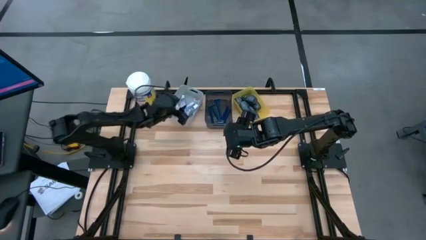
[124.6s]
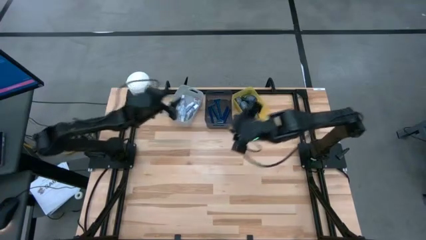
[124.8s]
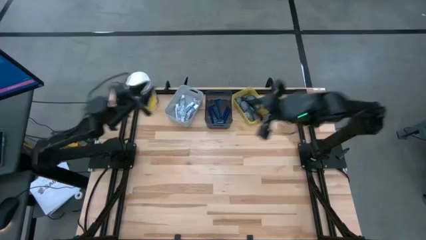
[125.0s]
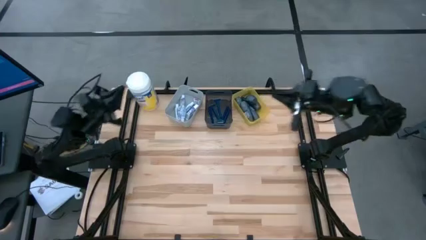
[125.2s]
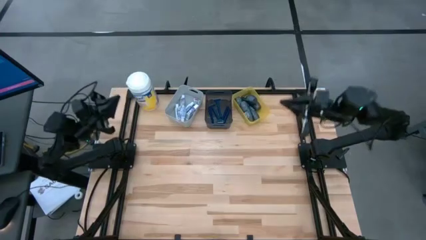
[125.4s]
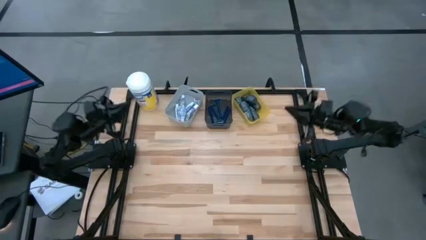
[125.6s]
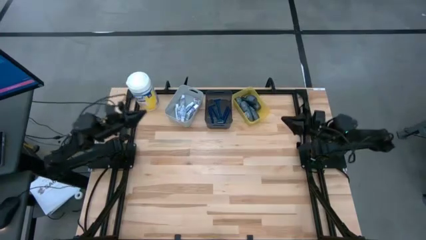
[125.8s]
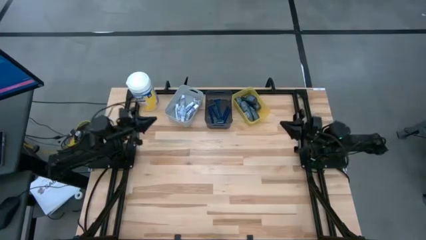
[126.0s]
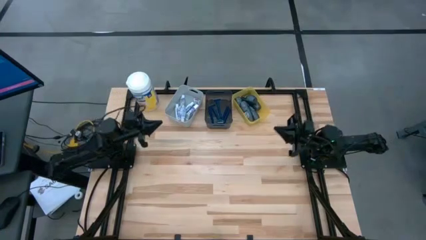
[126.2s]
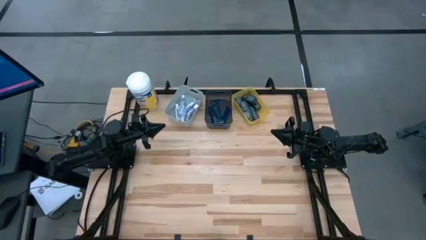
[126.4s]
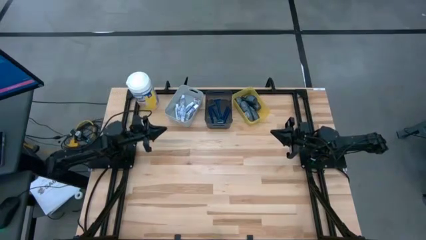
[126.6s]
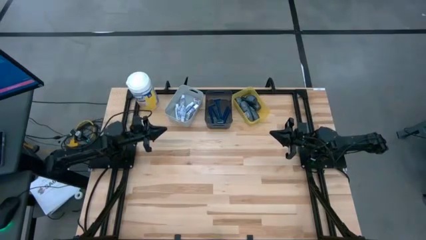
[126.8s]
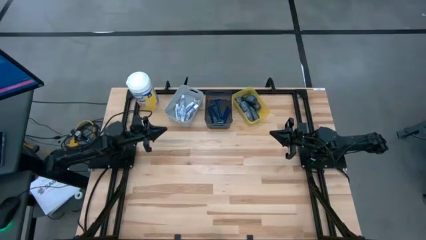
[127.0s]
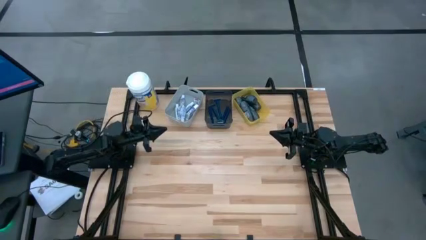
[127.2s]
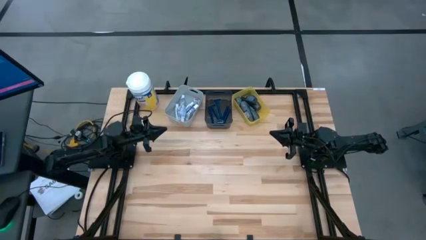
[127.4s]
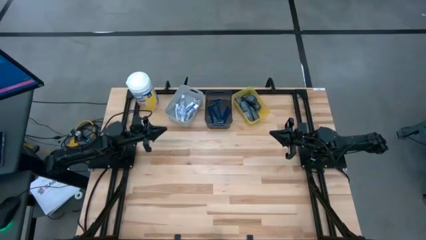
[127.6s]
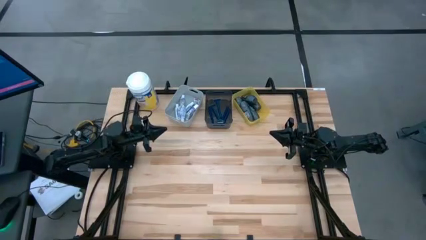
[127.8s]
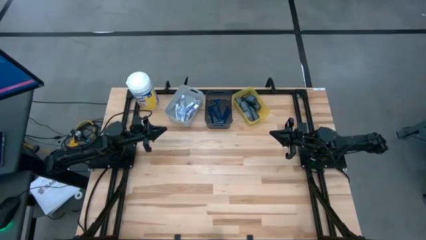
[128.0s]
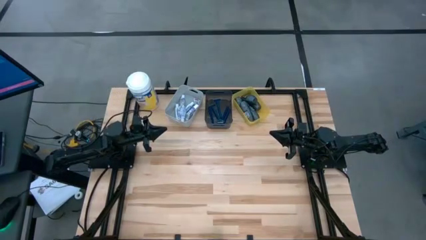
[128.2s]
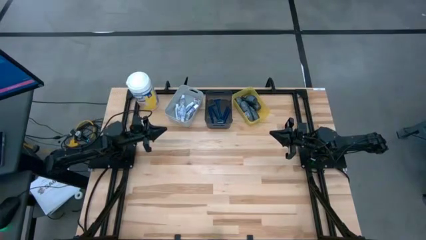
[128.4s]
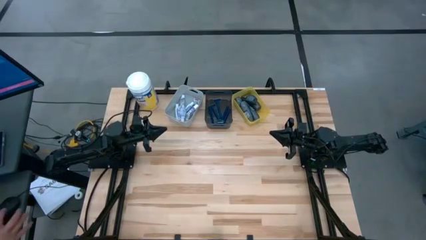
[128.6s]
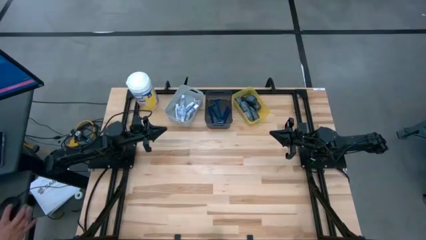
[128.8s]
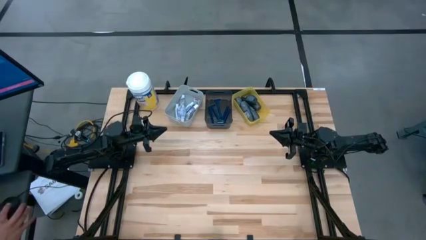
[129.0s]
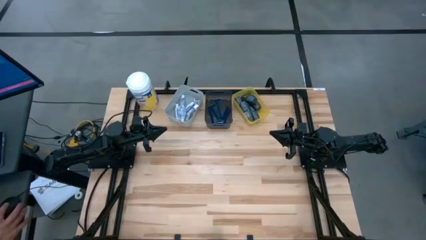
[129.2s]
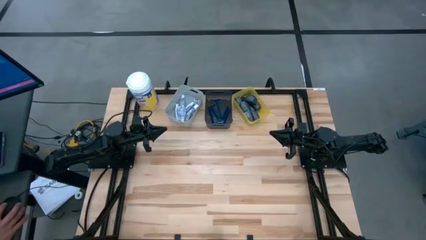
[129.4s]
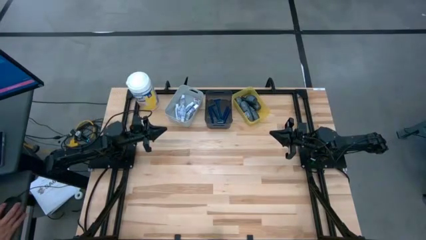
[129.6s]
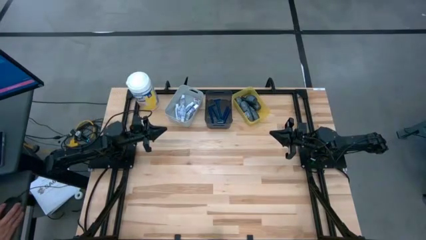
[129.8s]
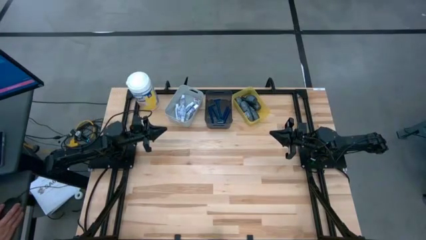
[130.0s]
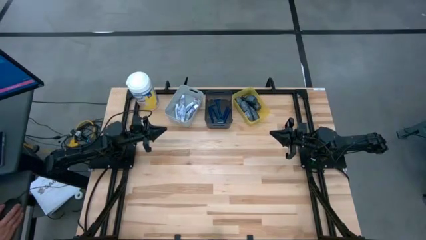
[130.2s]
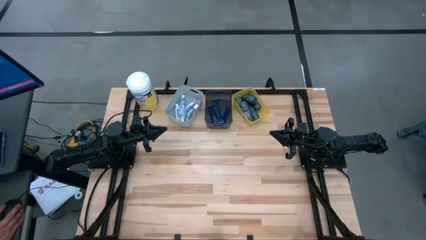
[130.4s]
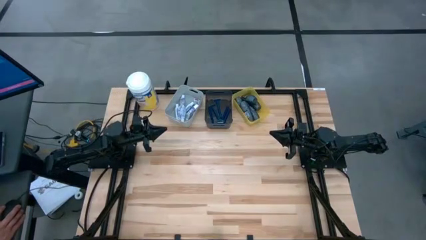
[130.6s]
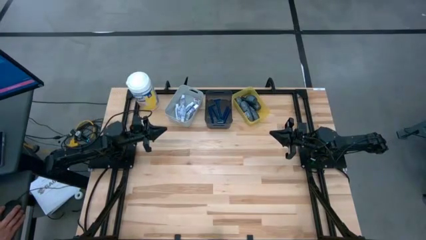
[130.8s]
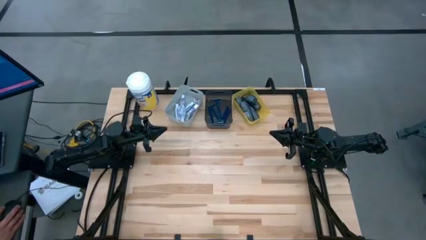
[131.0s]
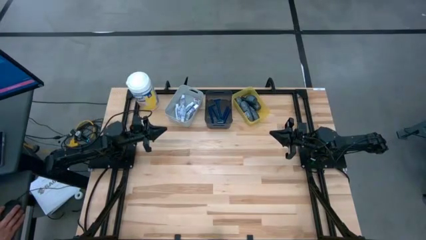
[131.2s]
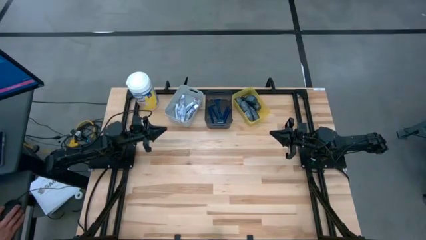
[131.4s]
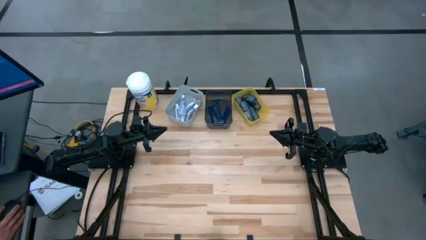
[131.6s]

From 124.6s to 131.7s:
Task: Pick & Place Travel size toiletries
Return to Home Position

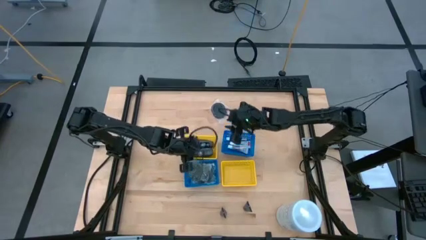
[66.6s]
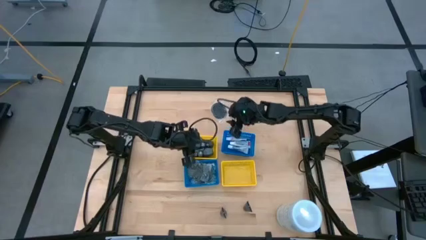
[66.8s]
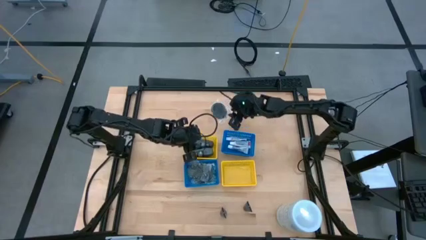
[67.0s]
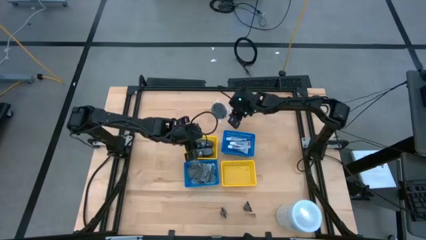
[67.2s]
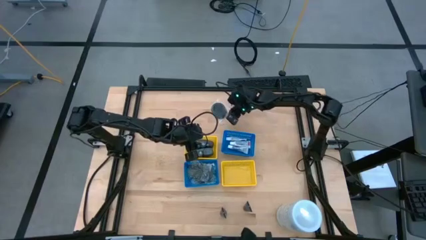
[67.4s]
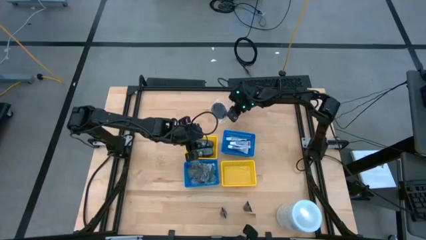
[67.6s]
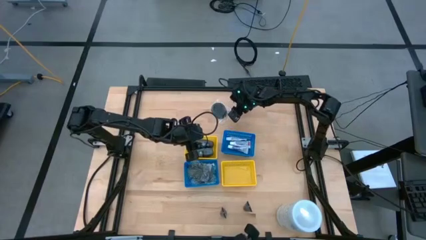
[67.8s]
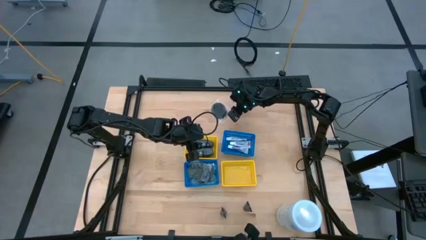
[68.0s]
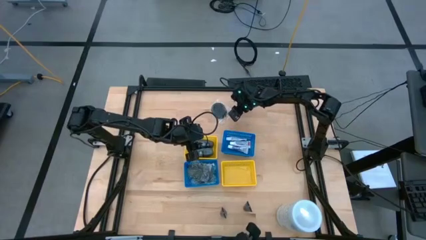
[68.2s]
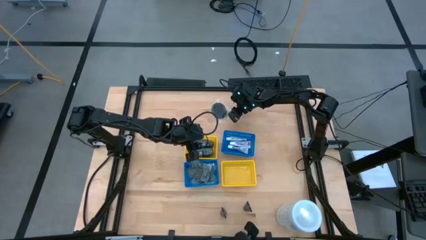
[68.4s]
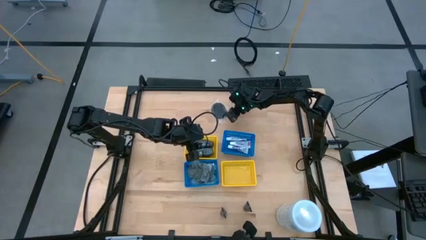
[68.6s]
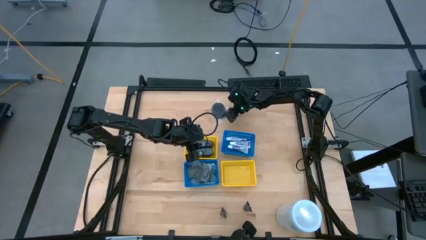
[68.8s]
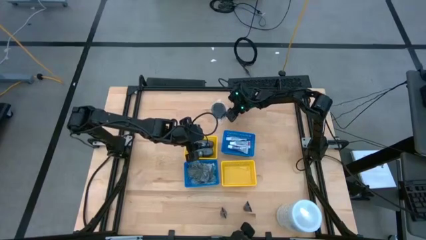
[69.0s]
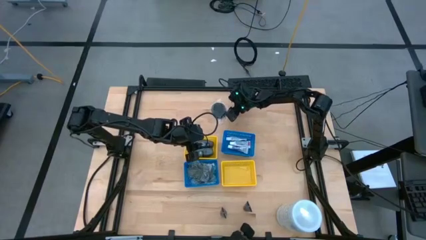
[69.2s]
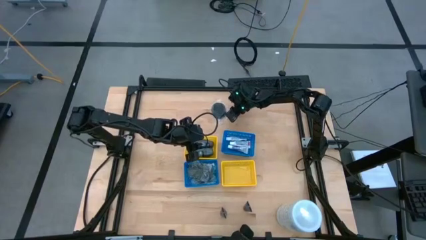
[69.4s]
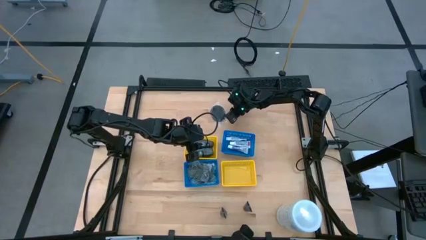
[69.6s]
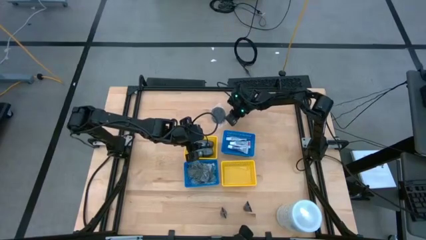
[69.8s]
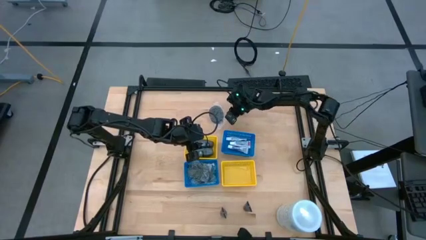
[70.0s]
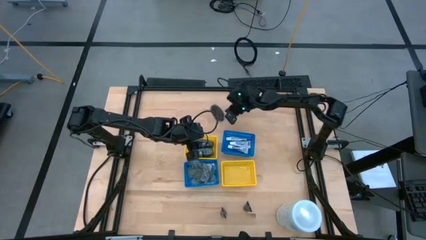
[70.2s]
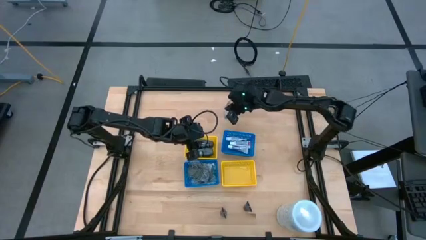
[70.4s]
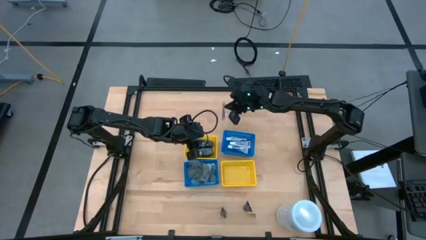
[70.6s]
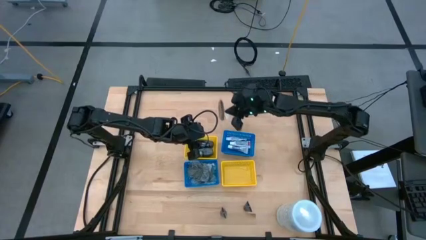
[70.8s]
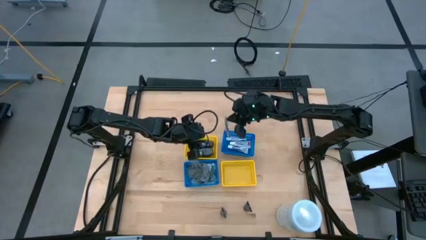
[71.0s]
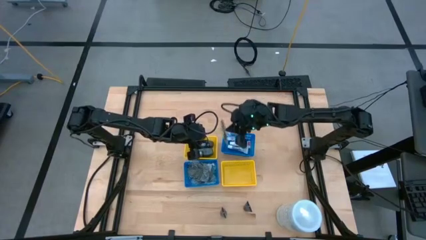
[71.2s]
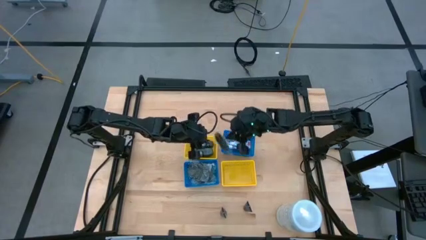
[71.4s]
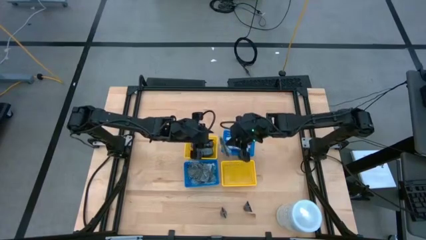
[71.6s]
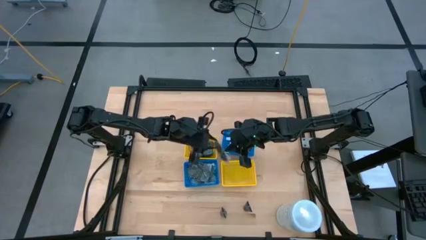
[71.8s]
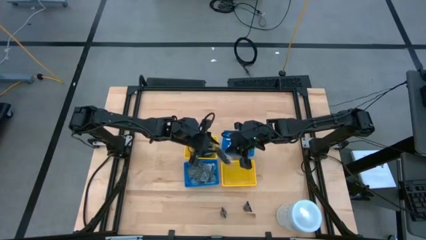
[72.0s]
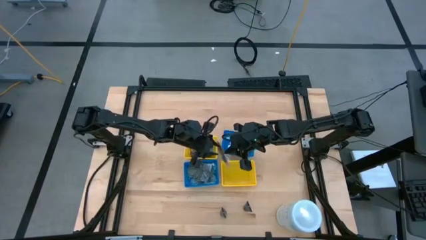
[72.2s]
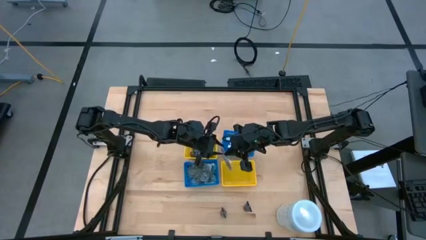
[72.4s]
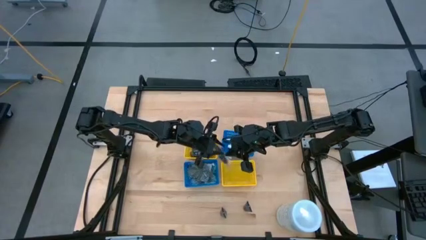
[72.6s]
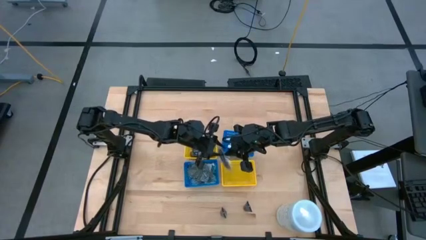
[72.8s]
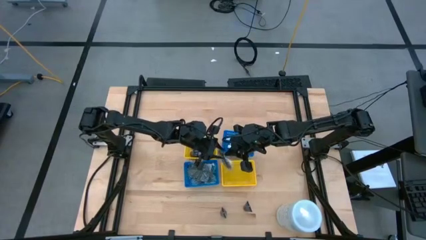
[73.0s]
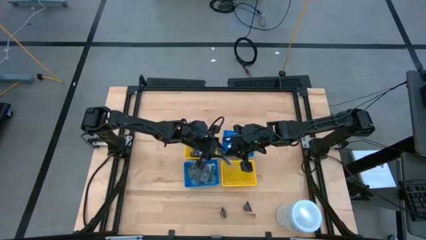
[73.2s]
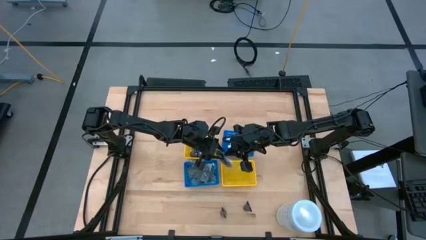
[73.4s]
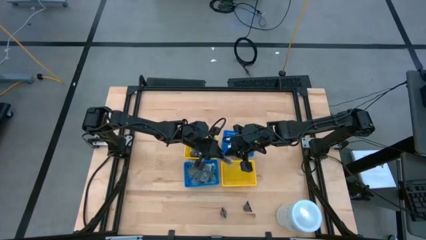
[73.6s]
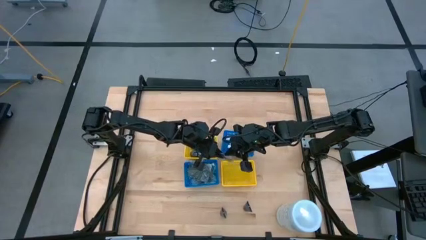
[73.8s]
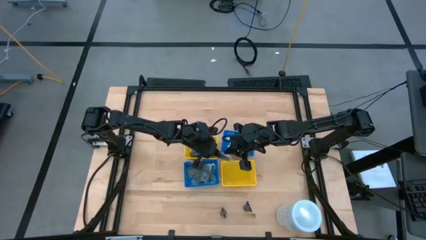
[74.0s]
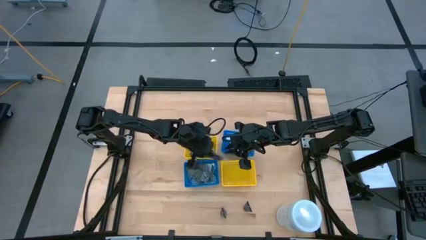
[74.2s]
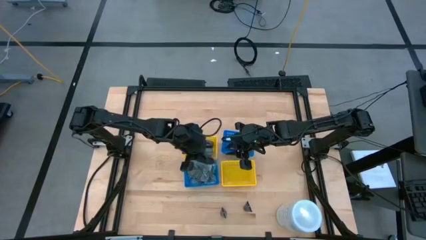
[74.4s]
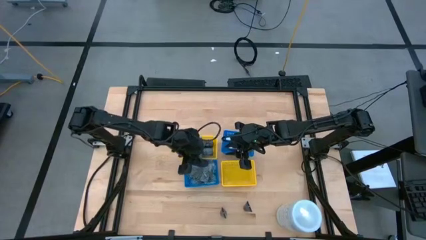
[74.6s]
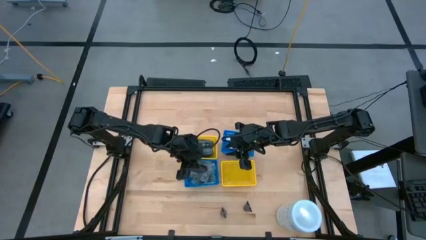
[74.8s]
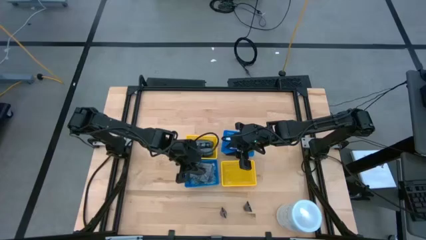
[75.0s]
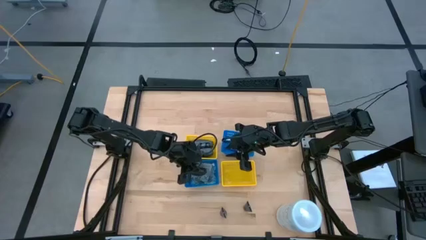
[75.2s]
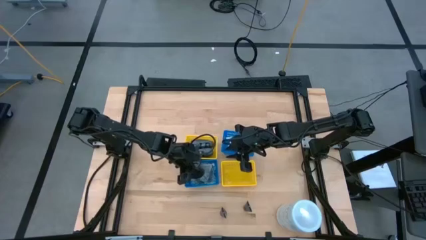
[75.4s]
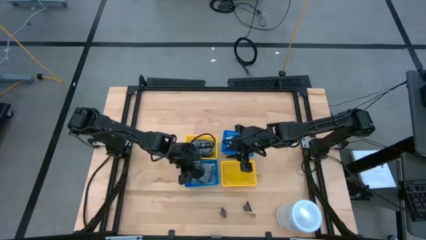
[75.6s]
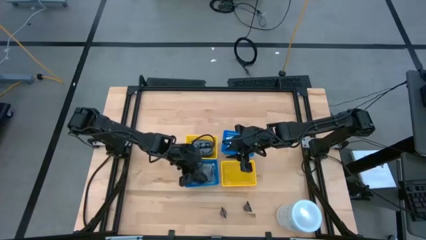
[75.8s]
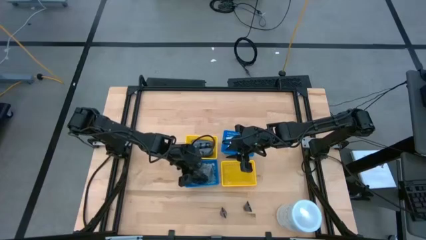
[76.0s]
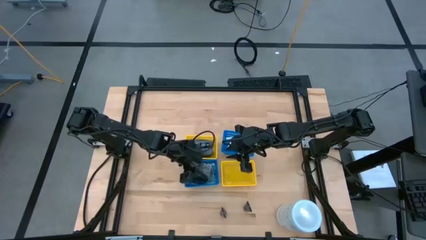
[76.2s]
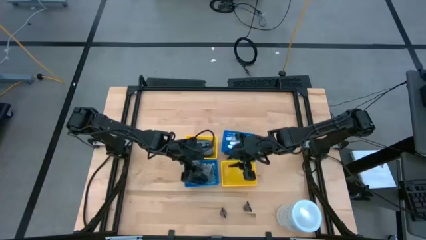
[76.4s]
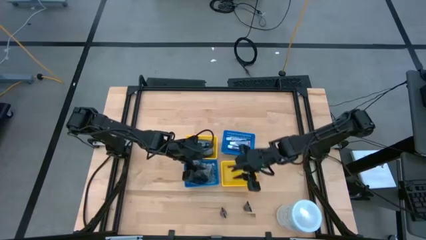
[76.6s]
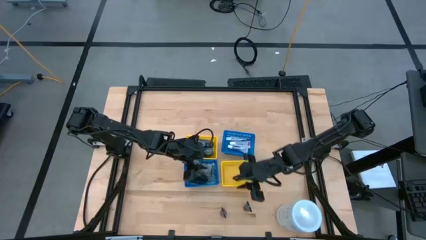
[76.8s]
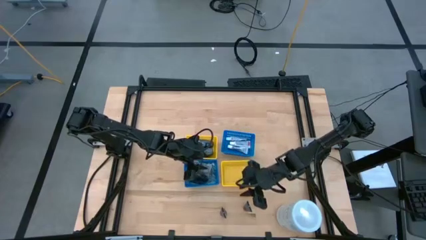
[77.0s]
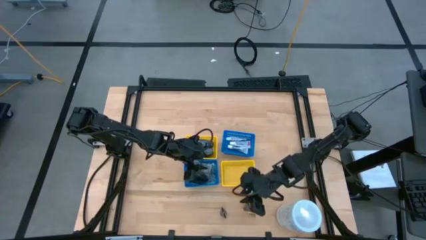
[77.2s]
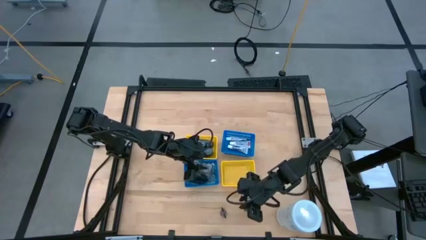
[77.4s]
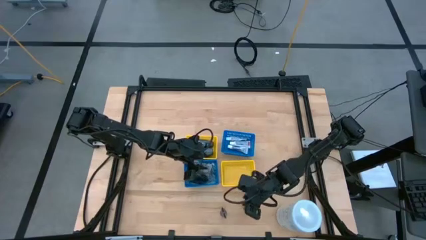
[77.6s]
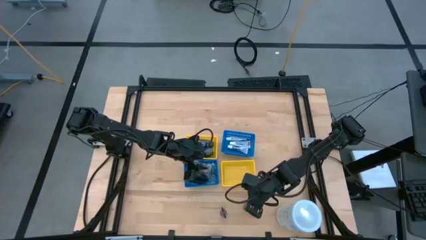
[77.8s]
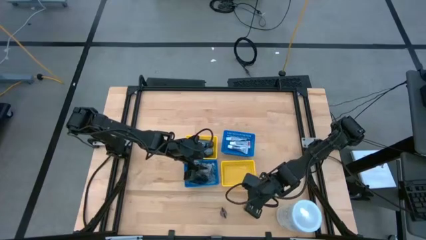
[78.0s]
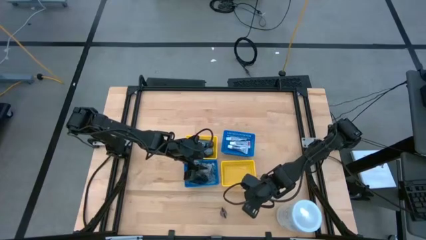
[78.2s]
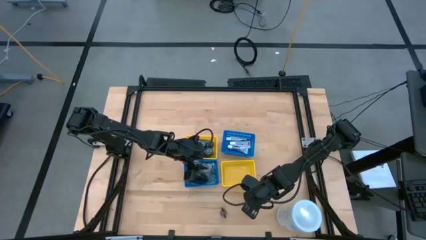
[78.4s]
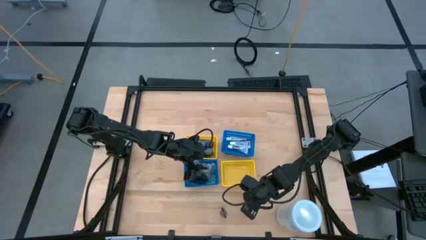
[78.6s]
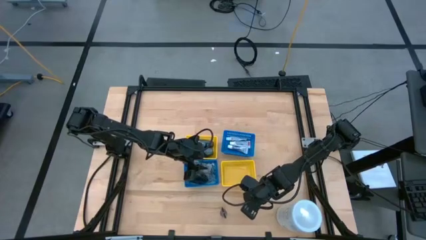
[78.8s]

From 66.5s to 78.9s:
Task: Pick & Place Travel size toiletries
Put the bottom hairbrush into the bottom left blue bin
